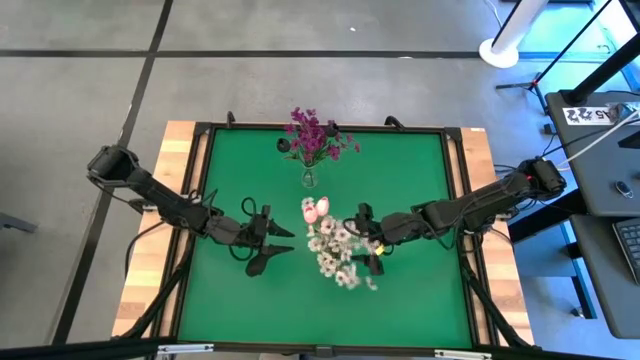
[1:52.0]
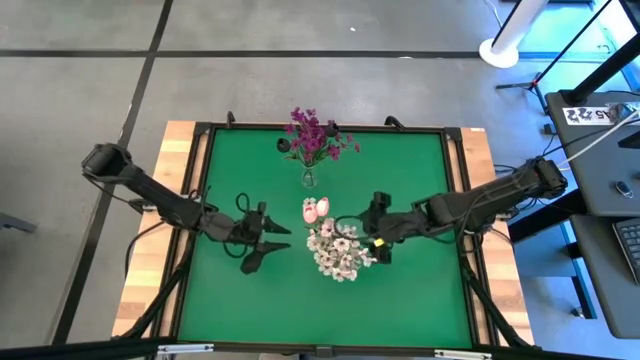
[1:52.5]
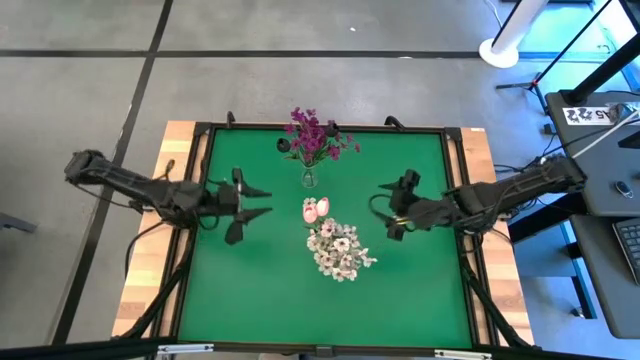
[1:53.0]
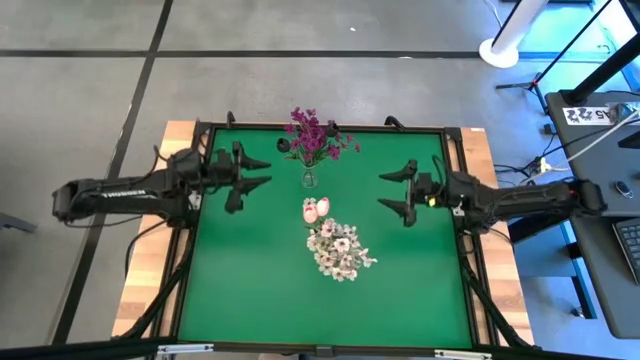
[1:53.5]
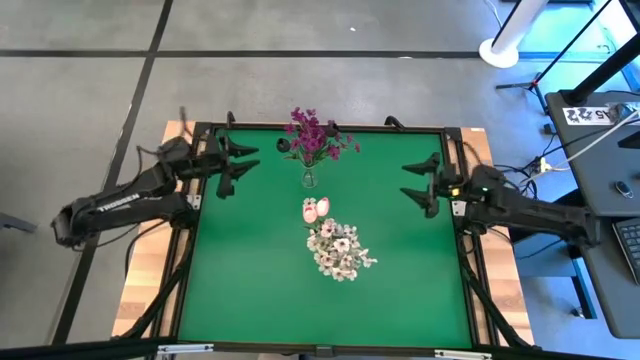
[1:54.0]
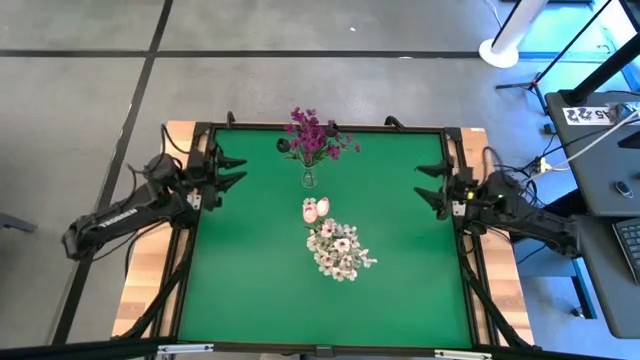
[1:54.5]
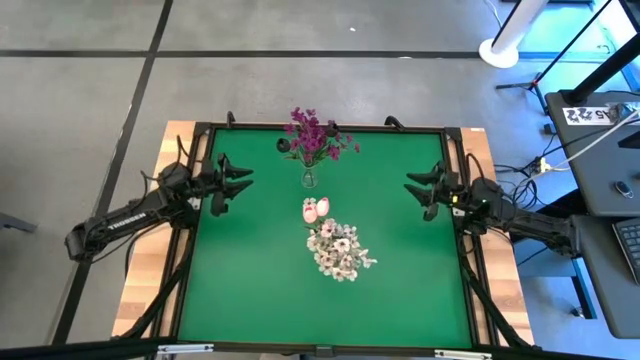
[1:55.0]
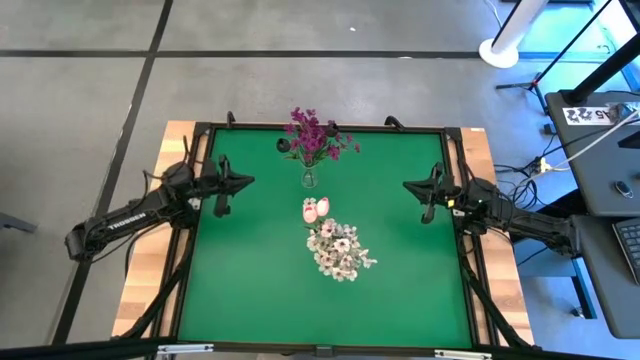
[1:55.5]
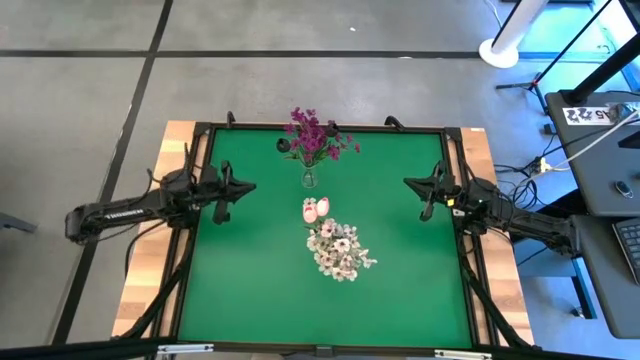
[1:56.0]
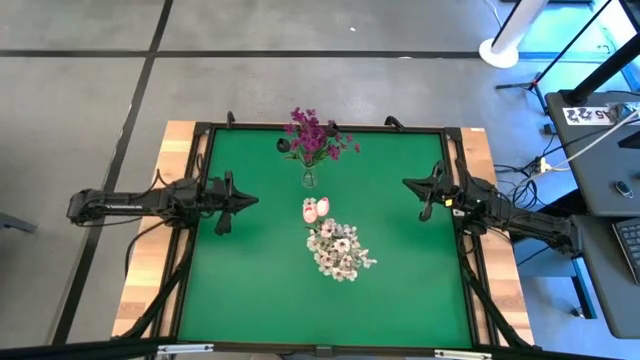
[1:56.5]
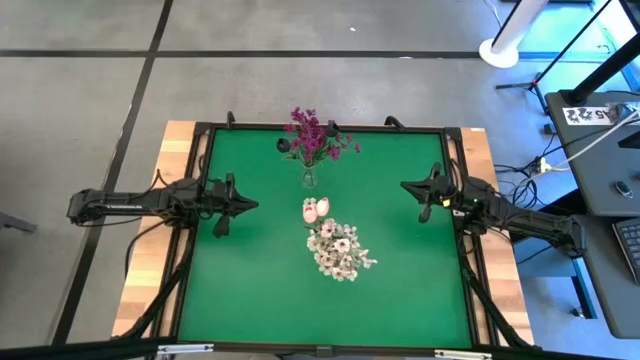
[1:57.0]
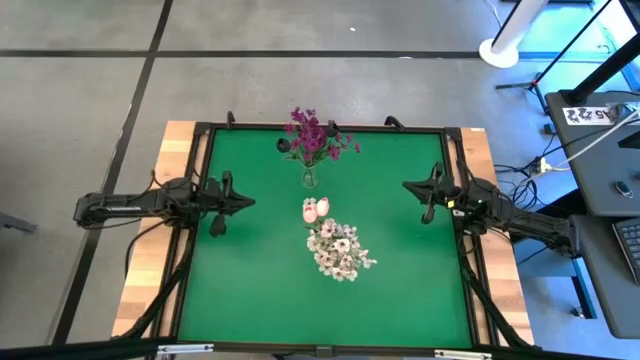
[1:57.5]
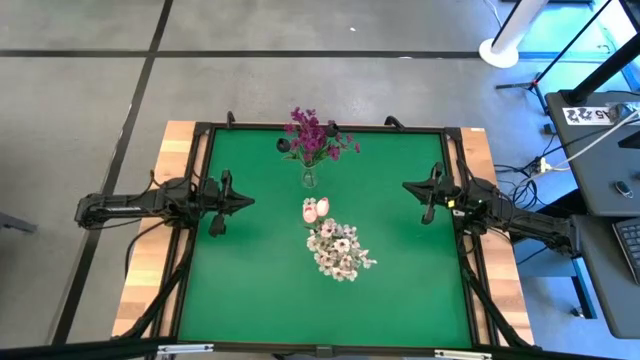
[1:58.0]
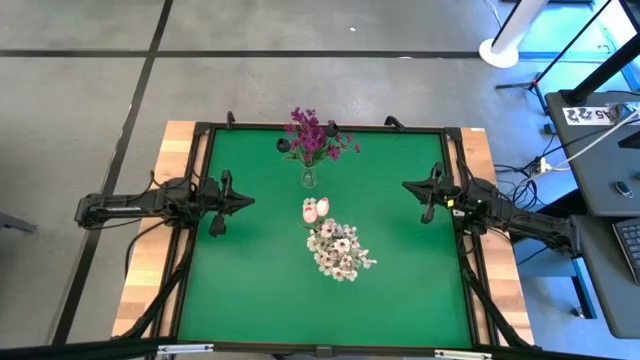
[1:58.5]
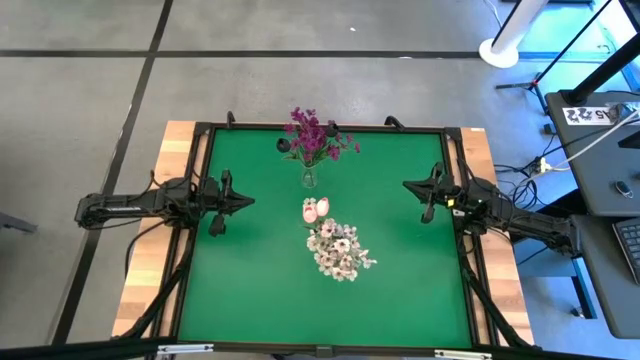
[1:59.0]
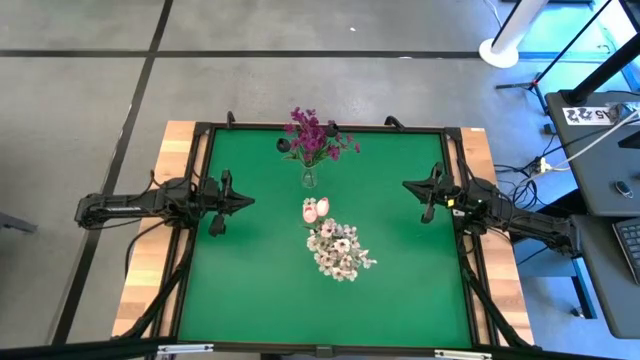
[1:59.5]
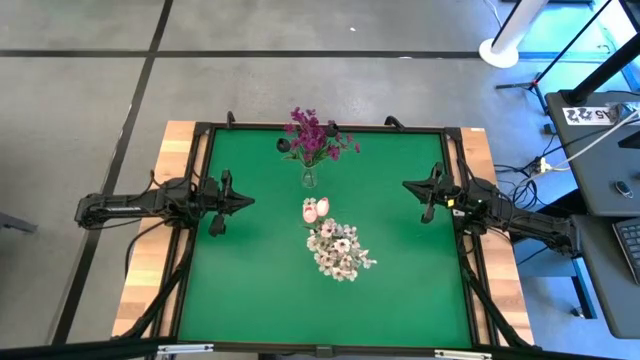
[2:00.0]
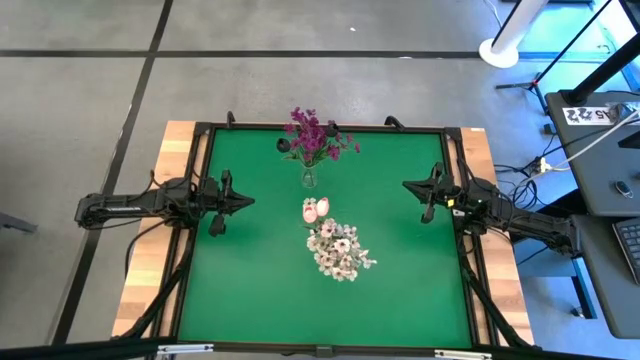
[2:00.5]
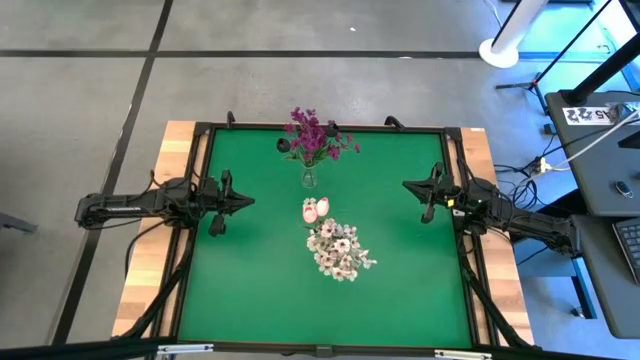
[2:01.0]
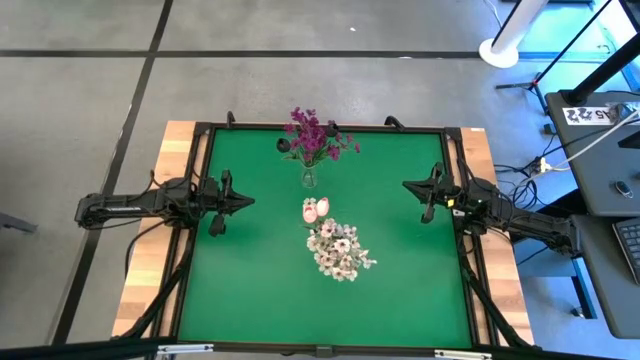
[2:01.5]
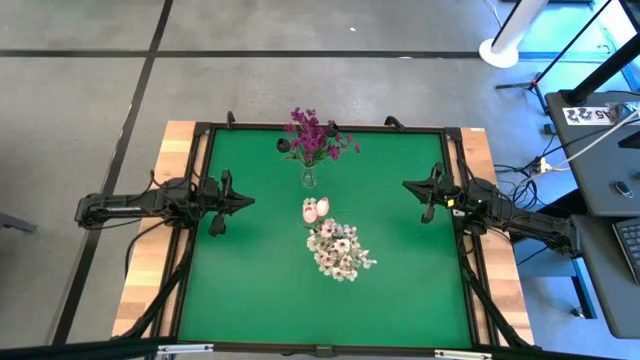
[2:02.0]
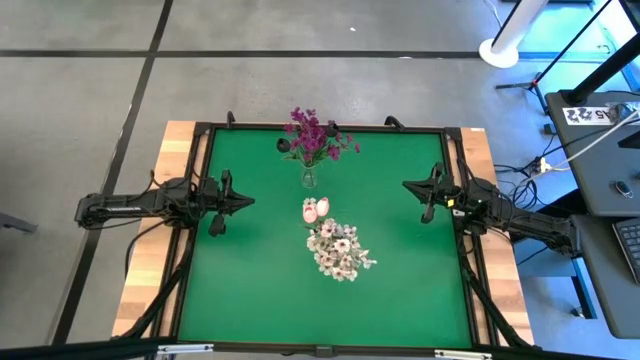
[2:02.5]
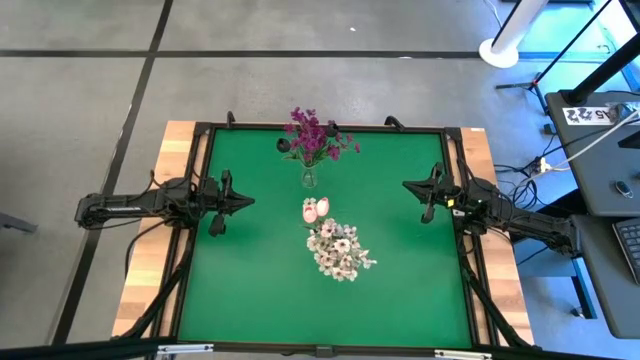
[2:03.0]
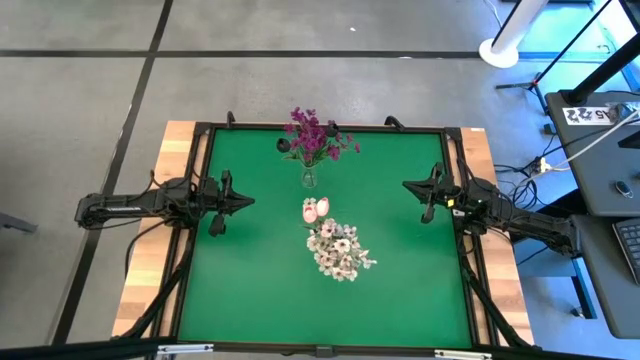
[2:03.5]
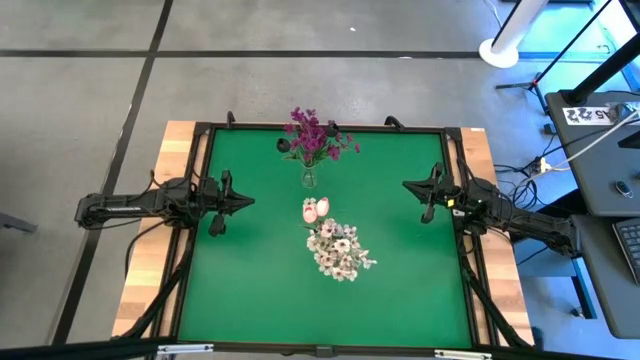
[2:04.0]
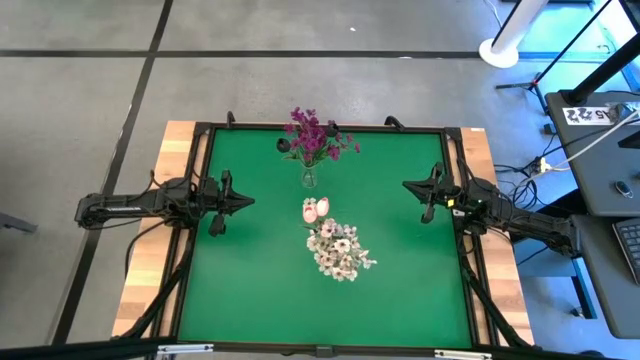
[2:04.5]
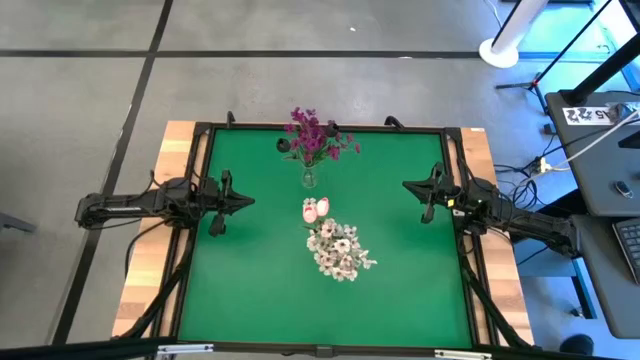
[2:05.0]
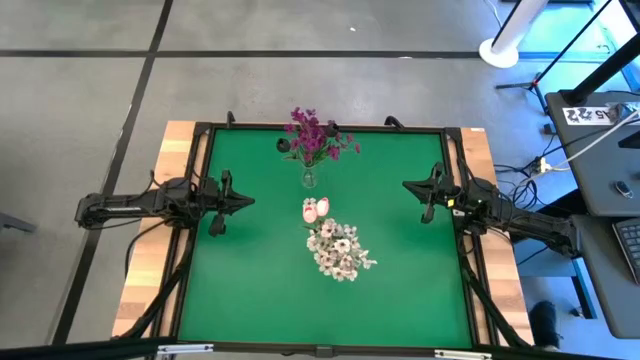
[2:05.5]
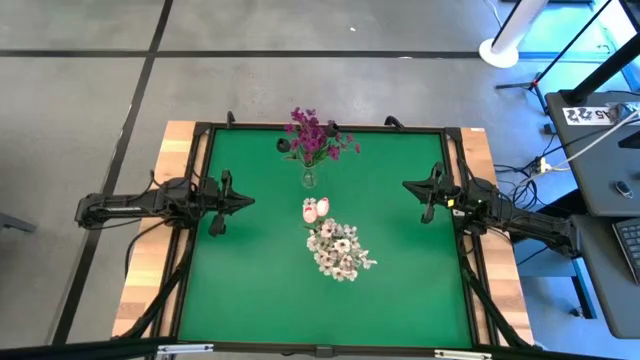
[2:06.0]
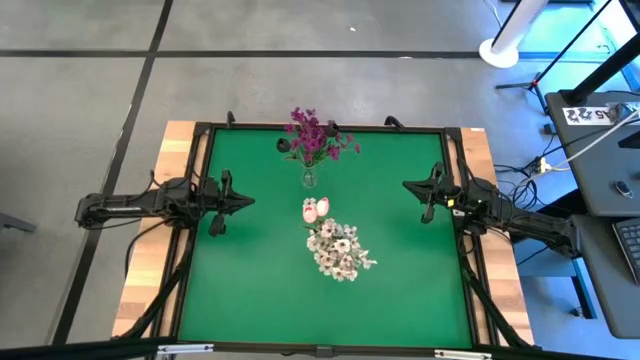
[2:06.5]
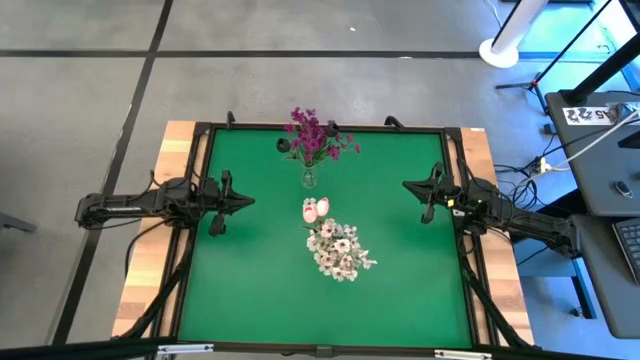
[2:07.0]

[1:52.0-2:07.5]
Task: Sort flowers into vase by color
Return to Home Position

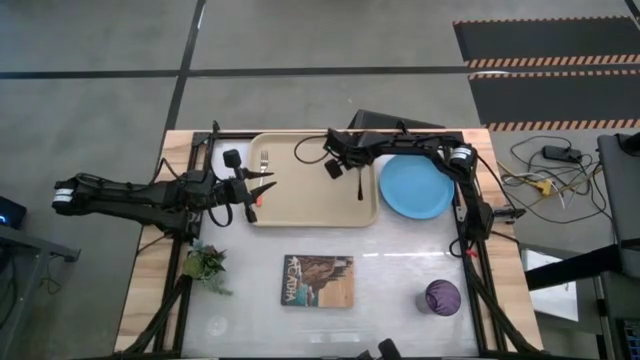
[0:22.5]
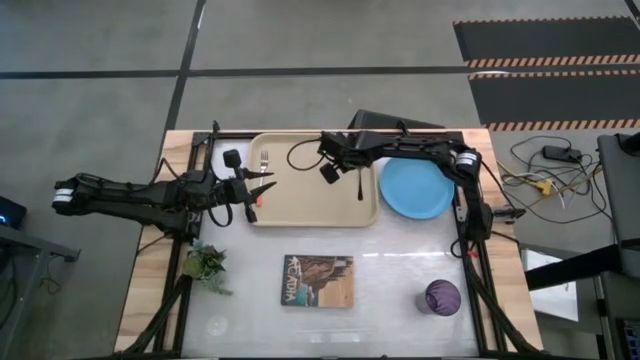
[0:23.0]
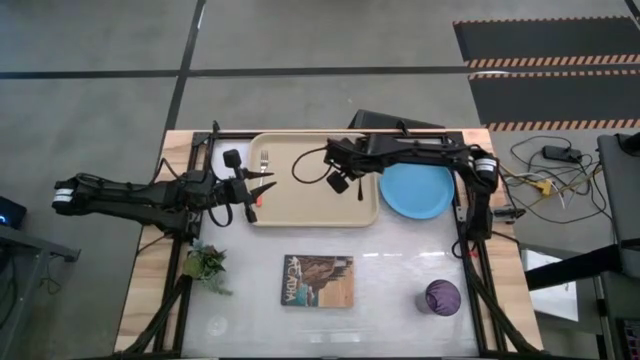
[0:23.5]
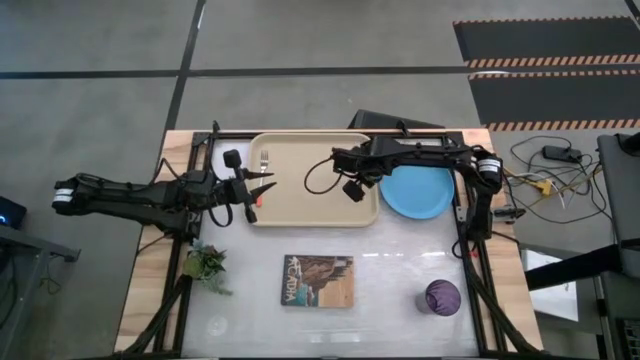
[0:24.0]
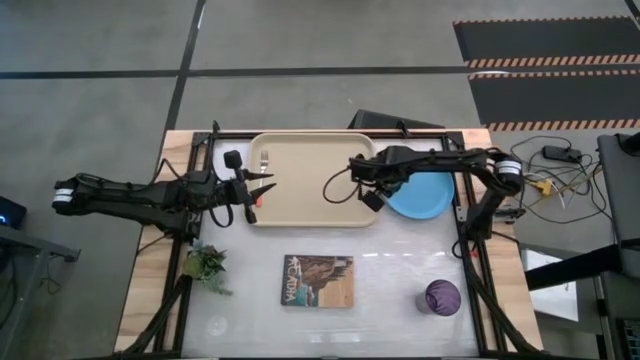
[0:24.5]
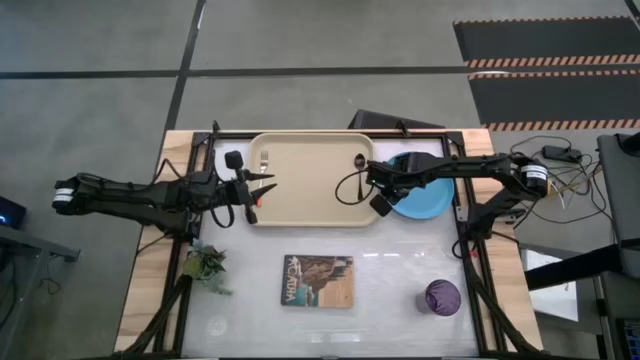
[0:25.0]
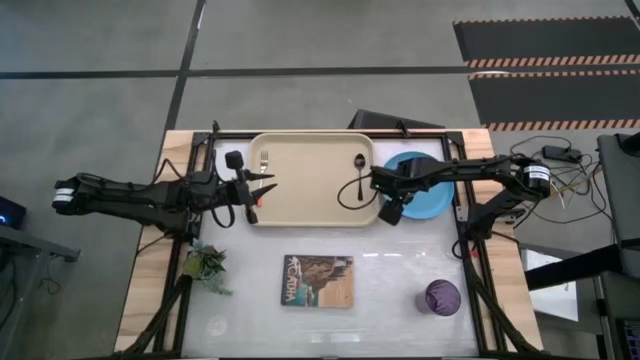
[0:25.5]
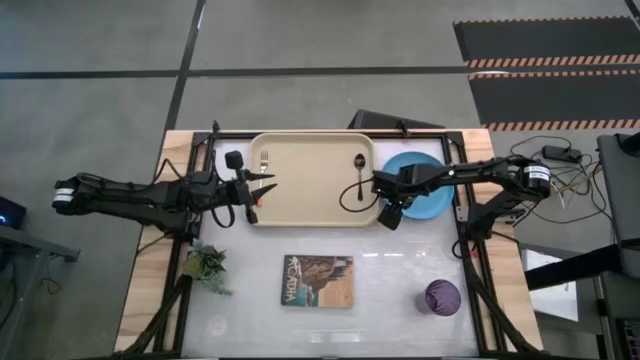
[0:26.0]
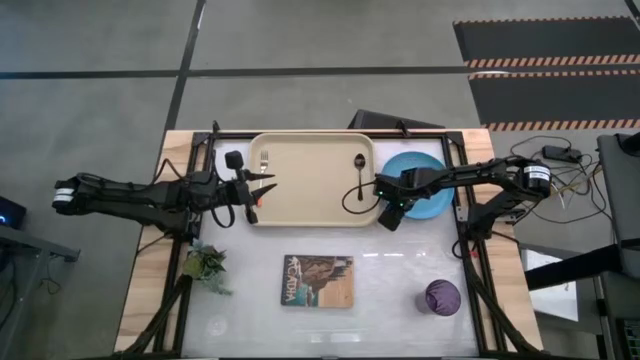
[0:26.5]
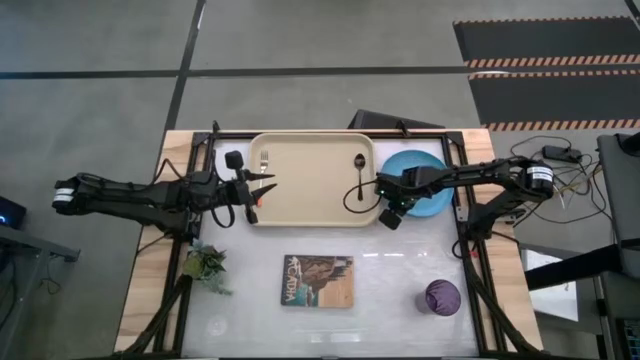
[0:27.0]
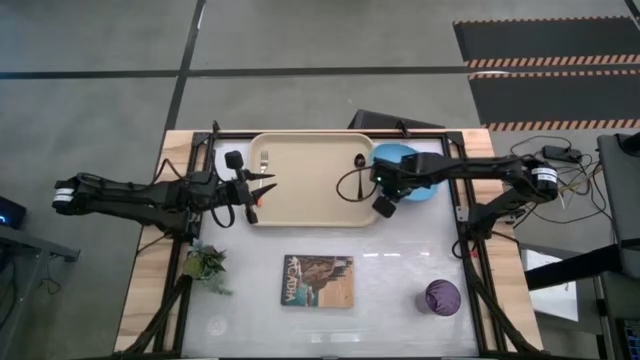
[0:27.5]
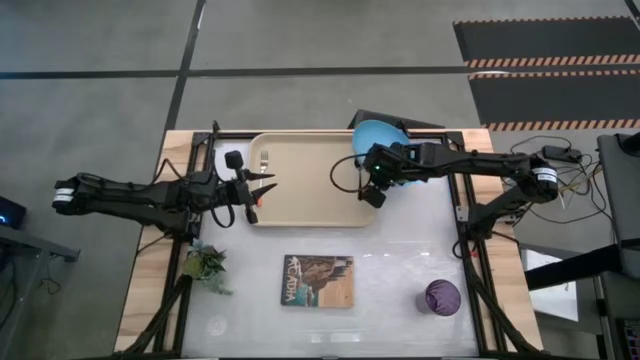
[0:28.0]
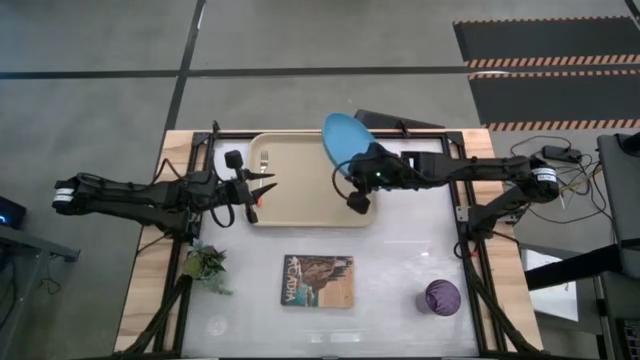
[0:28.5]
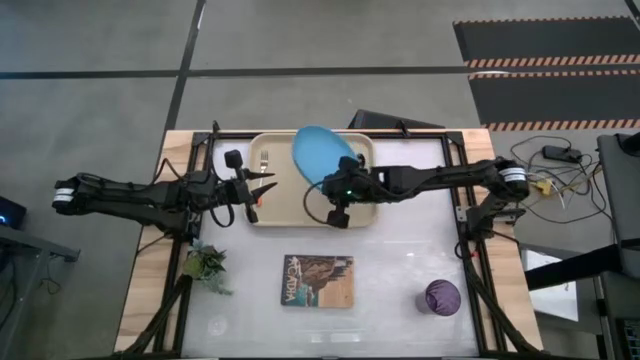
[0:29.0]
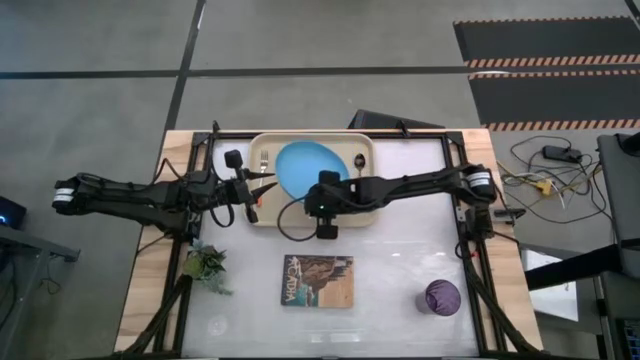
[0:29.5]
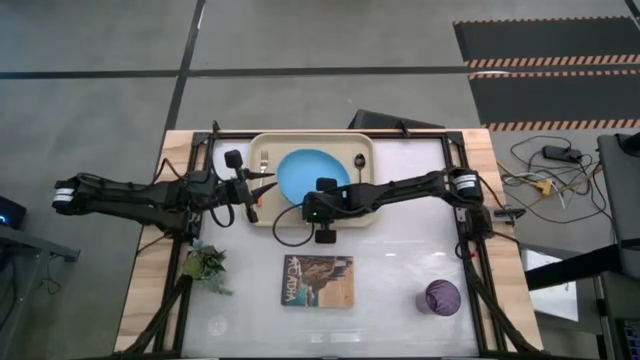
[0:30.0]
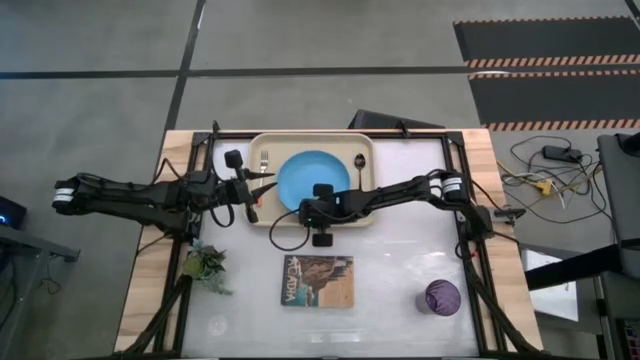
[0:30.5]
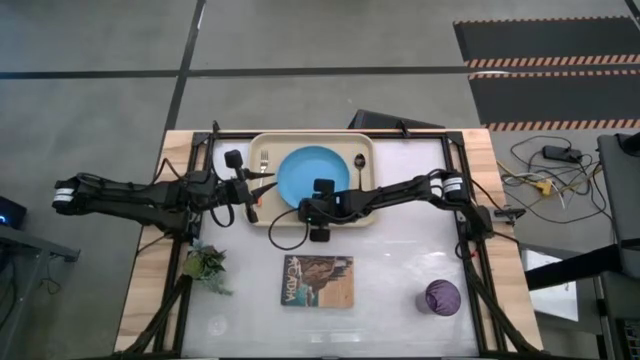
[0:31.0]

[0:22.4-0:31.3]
Task: Pick and place plate/cup/fork/spoon on tray
Put the blue plate on the light brown tray to the left of the black spoon
